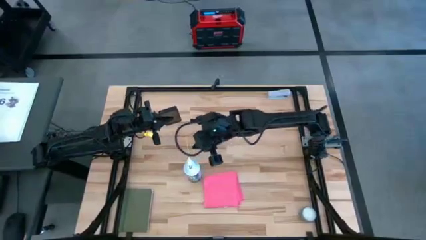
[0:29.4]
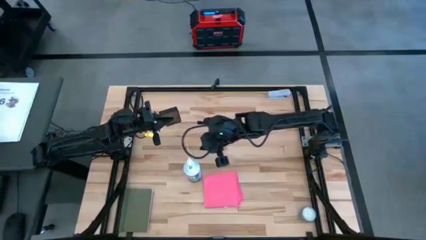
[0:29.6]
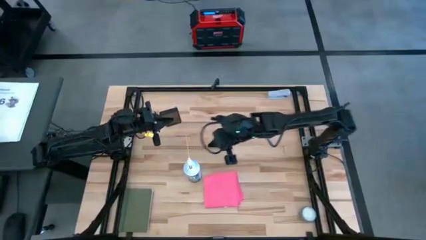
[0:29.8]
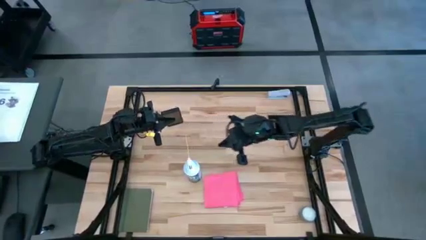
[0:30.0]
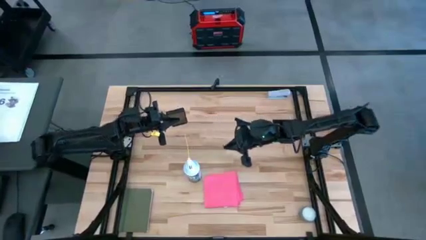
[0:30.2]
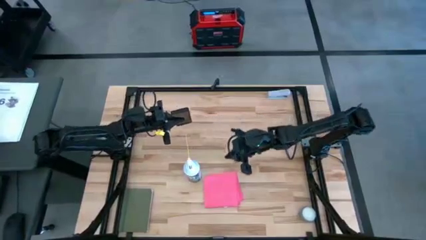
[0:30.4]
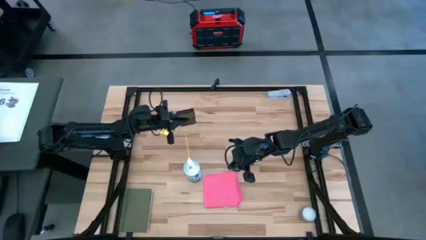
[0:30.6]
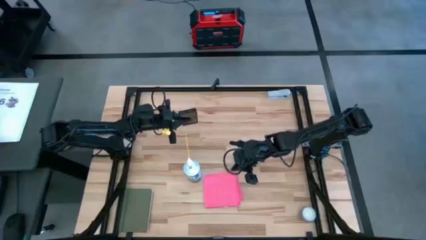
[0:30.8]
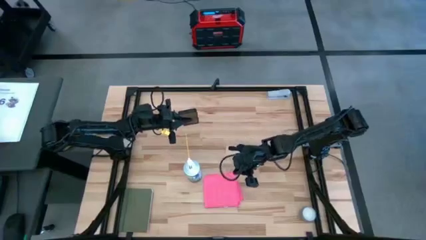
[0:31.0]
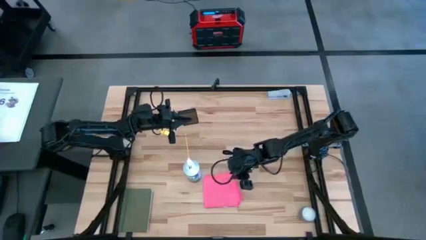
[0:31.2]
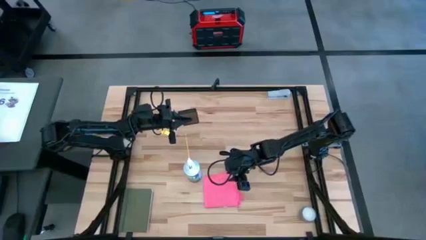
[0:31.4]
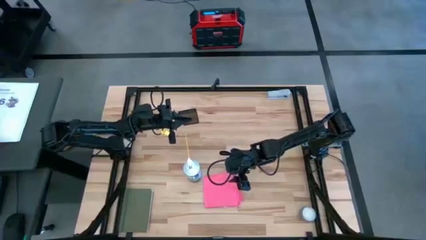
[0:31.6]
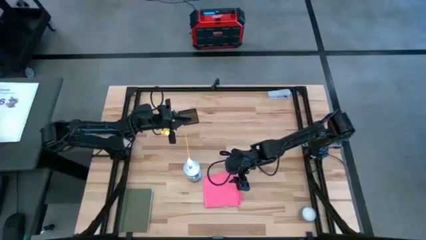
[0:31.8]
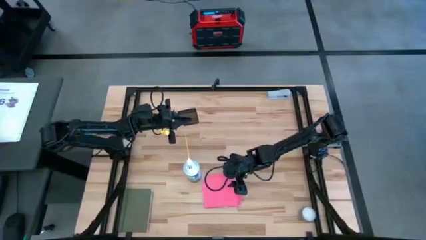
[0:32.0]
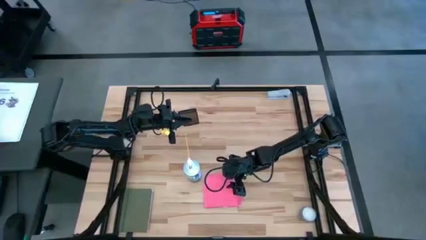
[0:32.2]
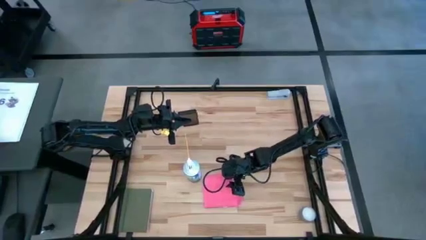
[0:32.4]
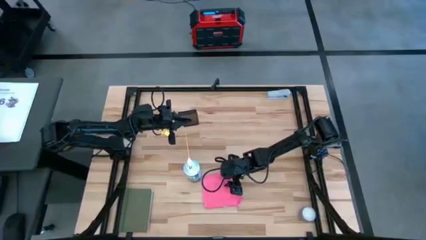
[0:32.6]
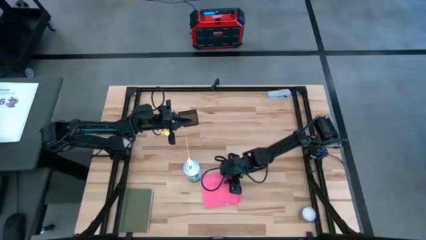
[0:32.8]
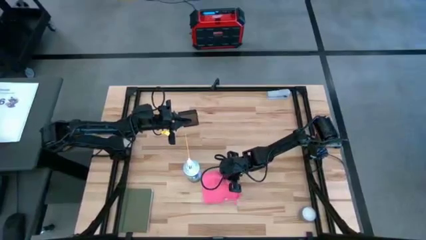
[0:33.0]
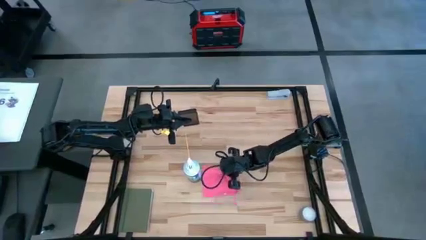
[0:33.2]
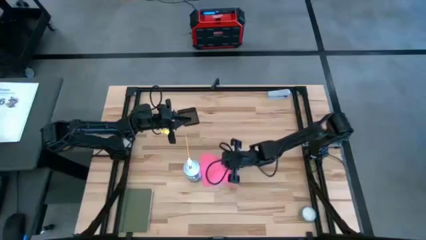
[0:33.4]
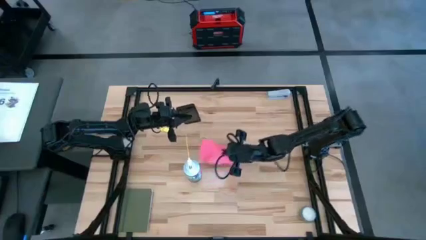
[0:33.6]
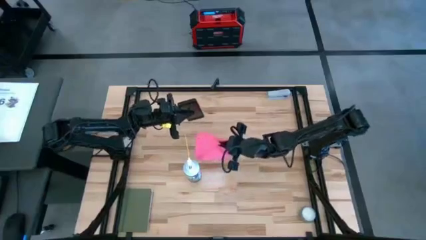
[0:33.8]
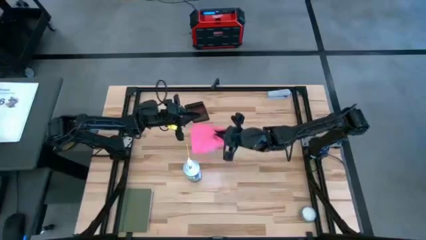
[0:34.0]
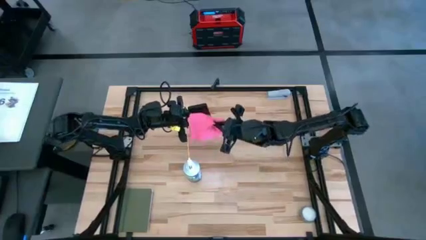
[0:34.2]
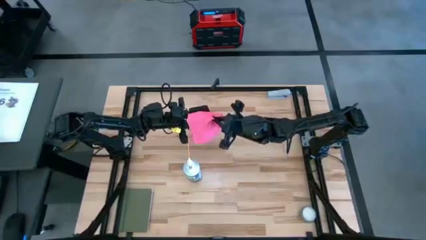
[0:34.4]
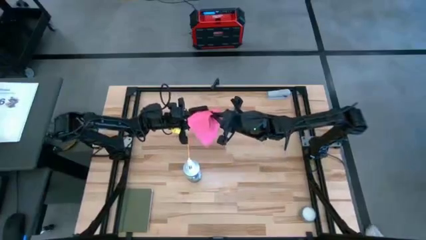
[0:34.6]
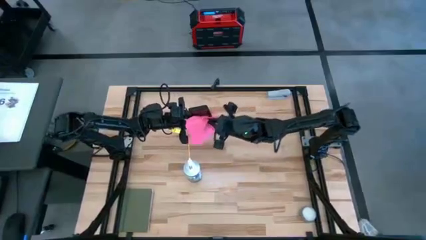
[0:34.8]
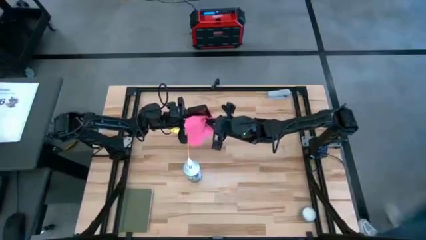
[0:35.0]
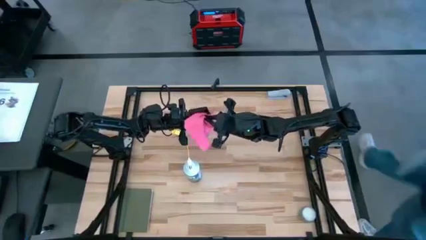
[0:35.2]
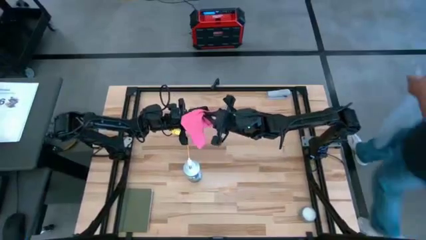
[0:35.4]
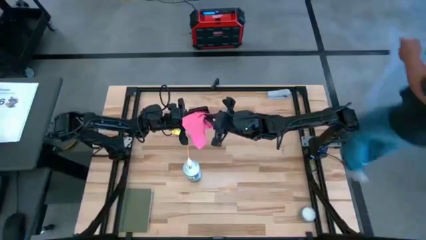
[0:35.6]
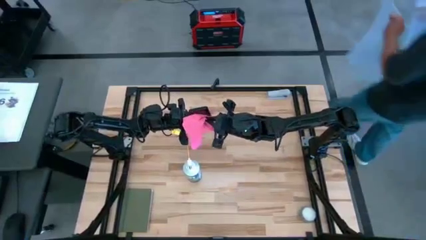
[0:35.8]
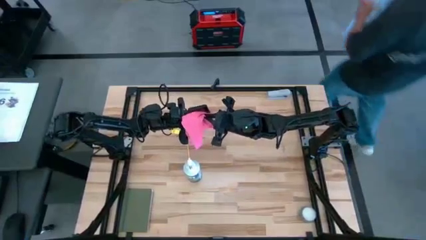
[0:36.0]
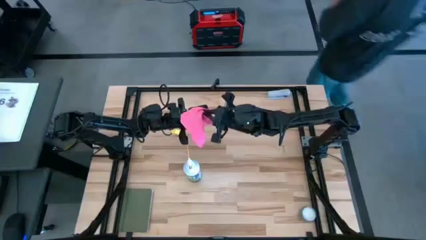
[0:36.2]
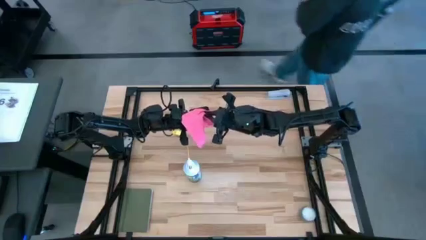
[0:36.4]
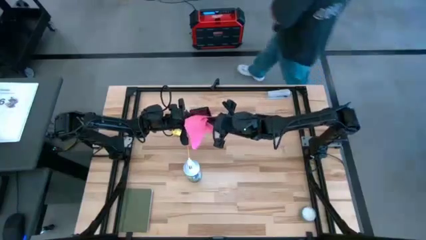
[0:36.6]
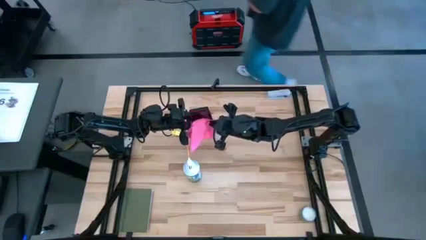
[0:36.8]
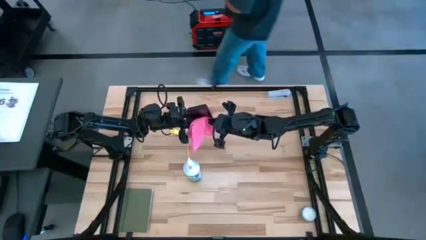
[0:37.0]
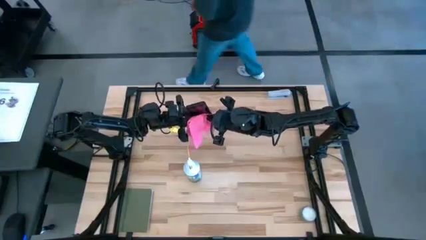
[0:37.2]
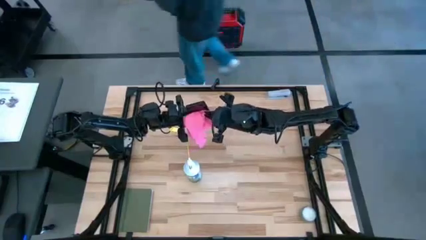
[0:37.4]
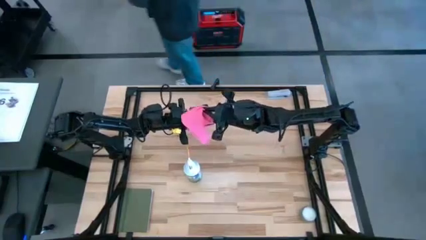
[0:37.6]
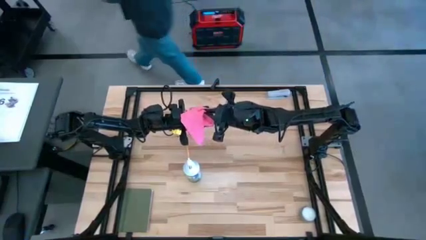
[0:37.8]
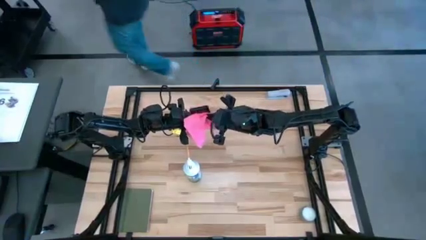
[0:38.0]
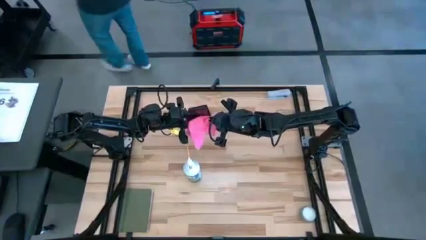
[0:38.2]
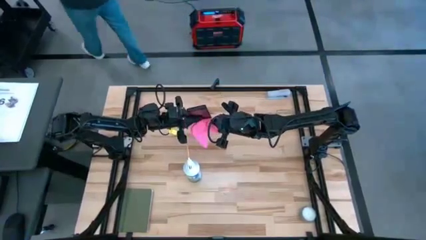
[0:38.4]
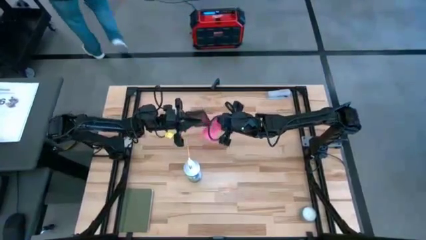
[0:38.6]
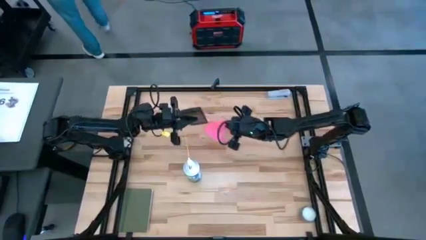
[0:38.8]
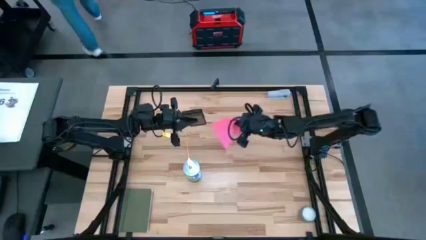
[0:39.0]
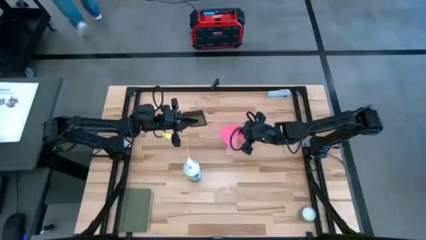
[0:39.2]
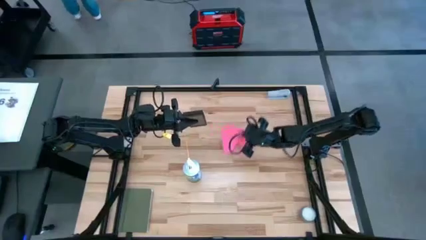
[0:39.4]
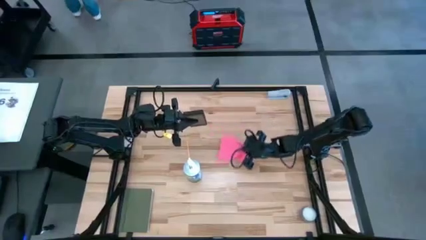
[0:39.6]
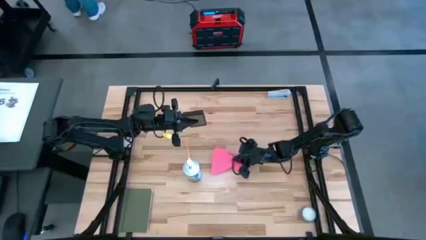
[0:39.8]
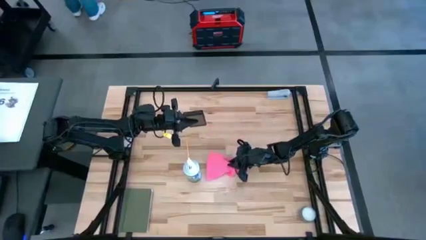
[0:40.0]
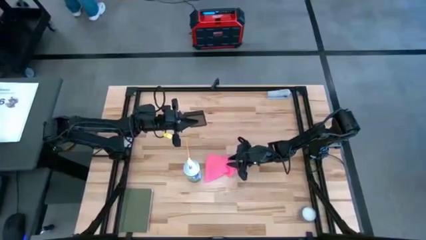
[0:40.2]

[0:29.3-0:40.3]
Task: Apply microfiber cloth
Wipe the front of the cellphone with the pink microfiber cloth
